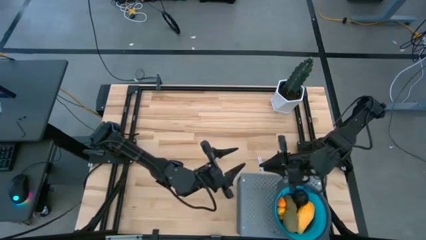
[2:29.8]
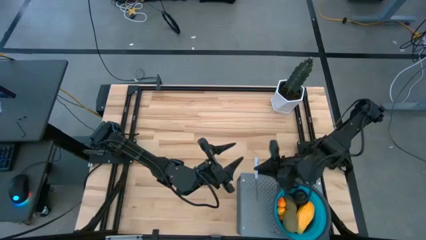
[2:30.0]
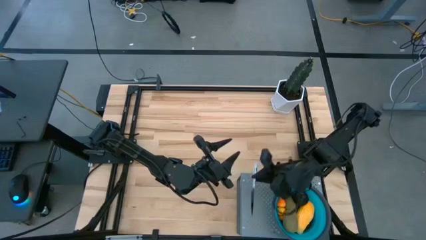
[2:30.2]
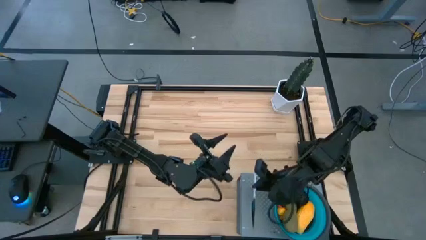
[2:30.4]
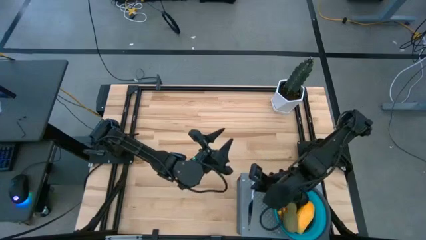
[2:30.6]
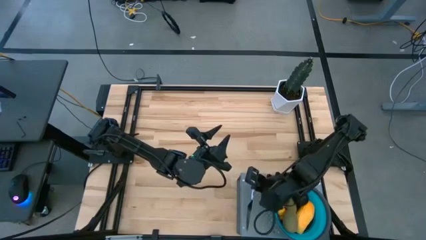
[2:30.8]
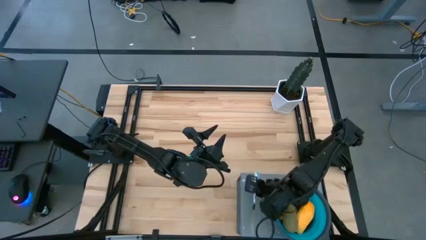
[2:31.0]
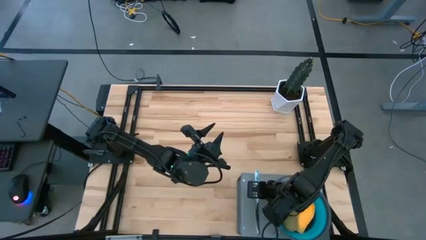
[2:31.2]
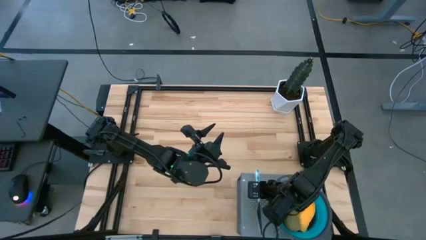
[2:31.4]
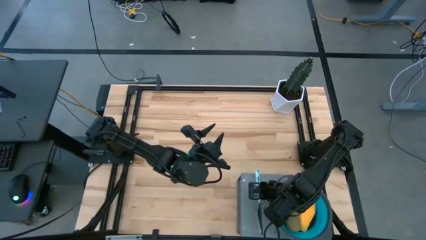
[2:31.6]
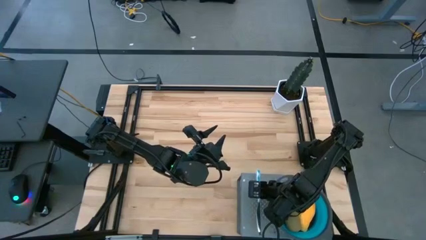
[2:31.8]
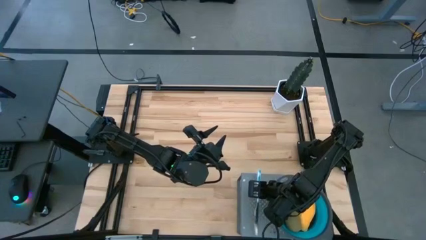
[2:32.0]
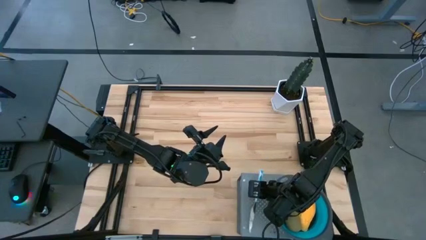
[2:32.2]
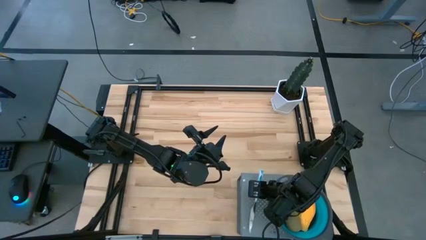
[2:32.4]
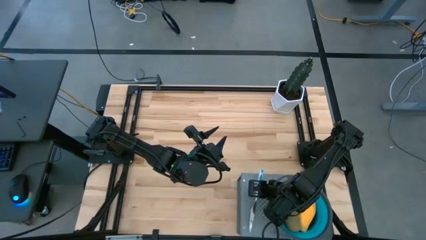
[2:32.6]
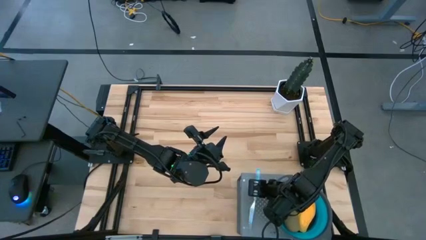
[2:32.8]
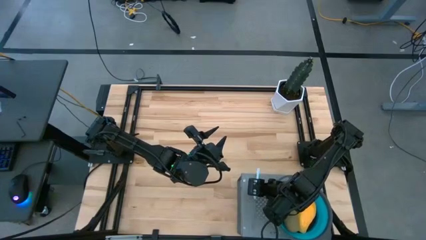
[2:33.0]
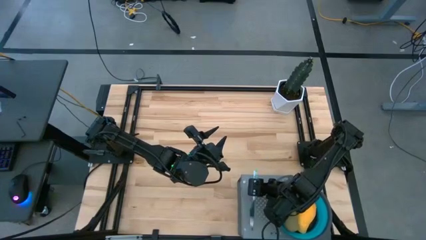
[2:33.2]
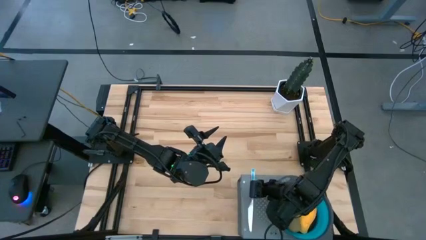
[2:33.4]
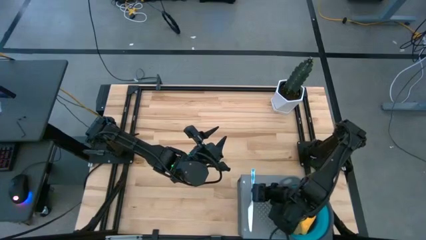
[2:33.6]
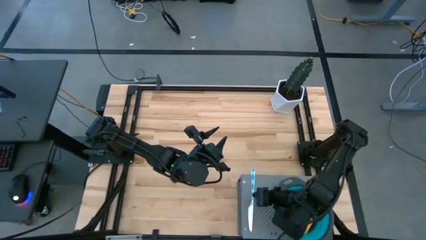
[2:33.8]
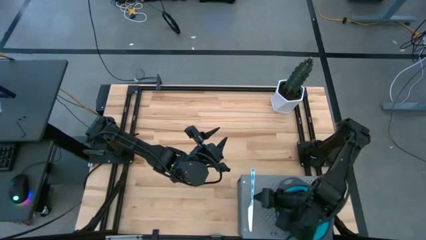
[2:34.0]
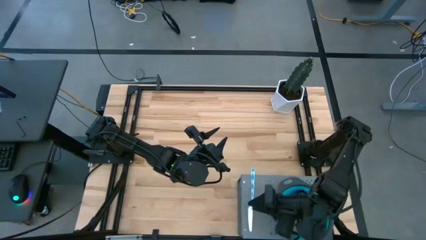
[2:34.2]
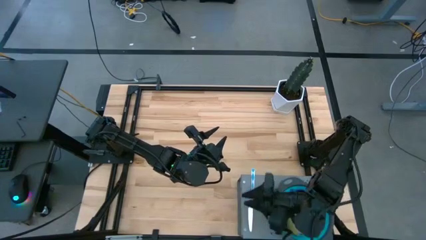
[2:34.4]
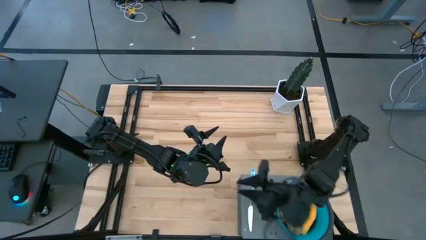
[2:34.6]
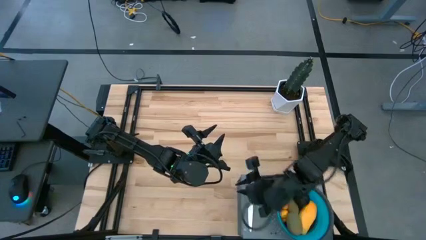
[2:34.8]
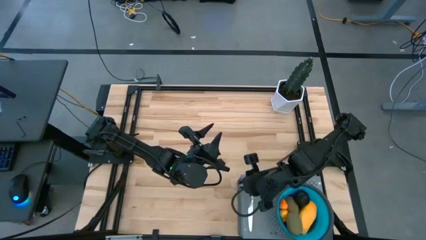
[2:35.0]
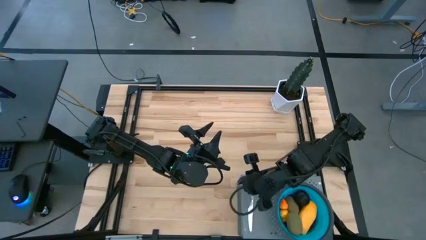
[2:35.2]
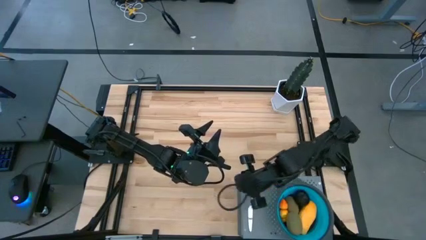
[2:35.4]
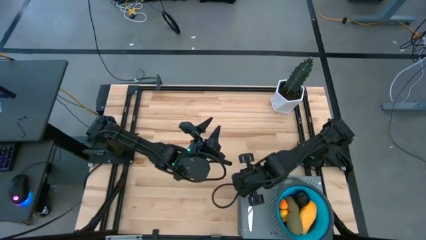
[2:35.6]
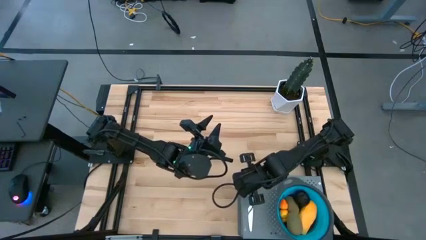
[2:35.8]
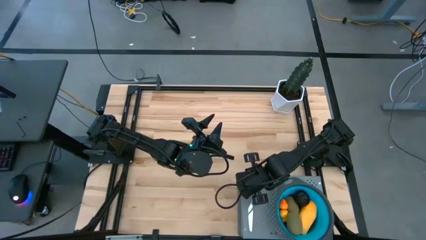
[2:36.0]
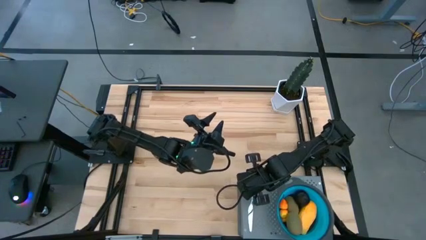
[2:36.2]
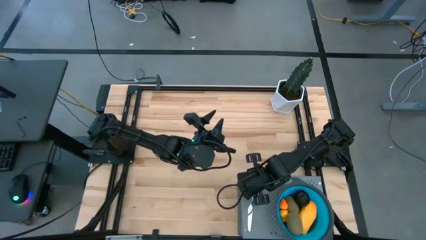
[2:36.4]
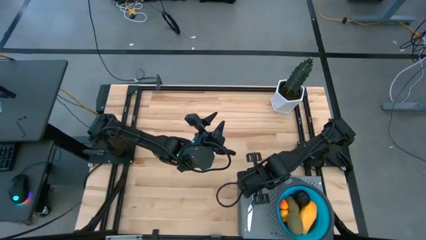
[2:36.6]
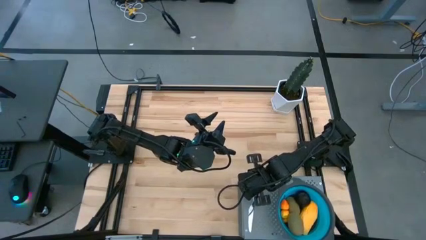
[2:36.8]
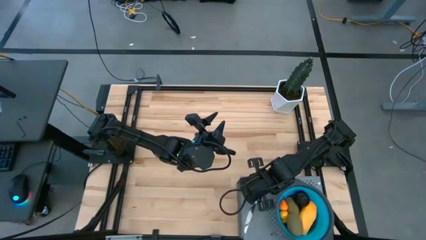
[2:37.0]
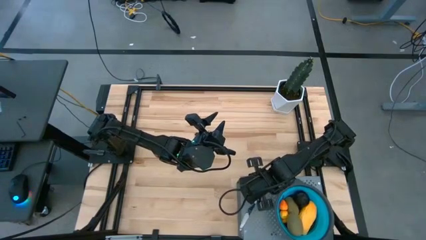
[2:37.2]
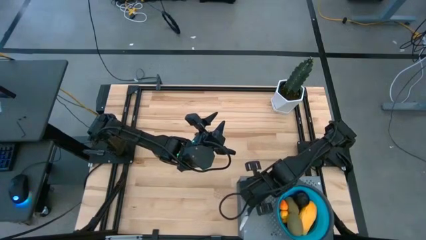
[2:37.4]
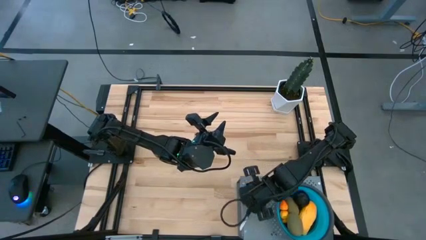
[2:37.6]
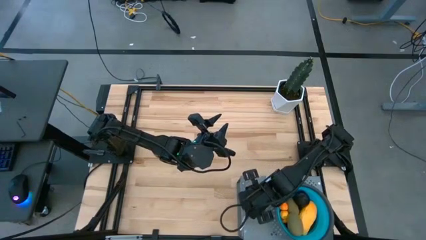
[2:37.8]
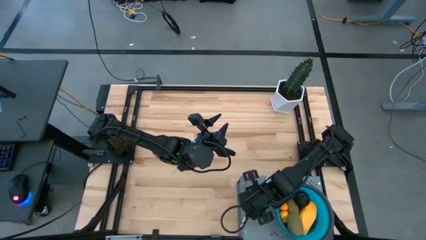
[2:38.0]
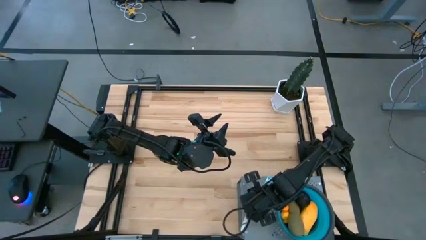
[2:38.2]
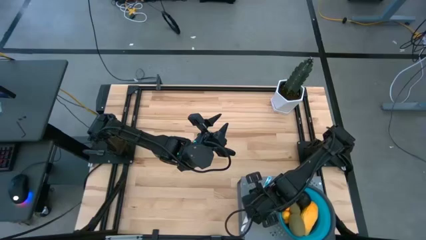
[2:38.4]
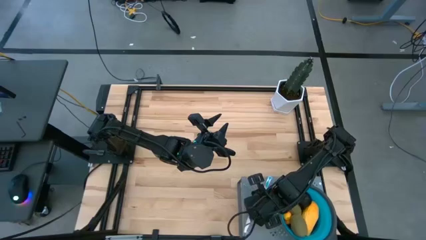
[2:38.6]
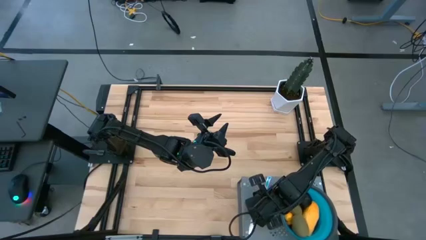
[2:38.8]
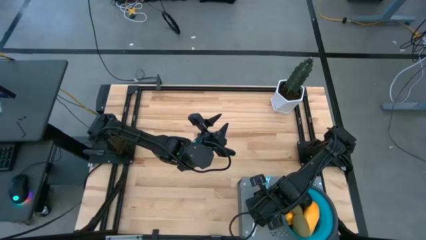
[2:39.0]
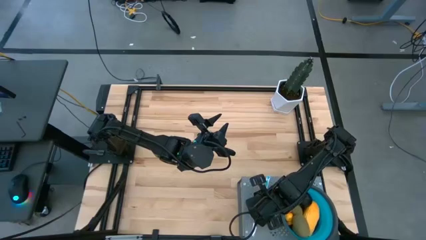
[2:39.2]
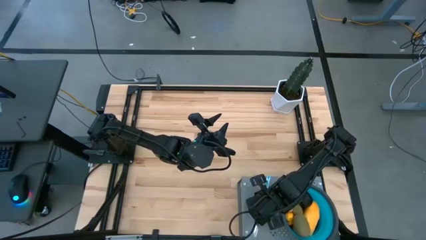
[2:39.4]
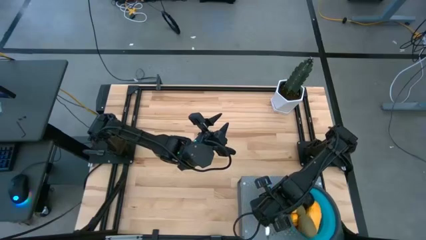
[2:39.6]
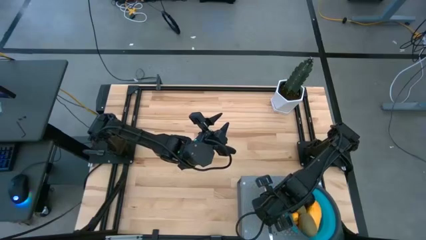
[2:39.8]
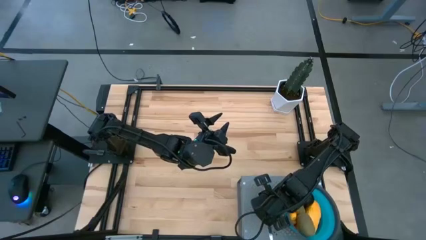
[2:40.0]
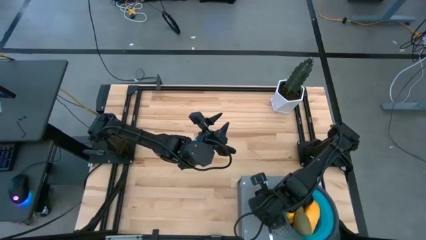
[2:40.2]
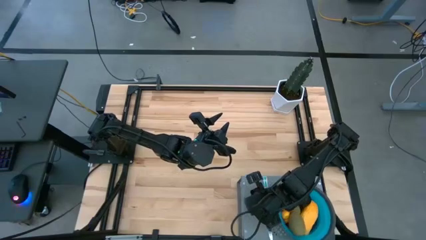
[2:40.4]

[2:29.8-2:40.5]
Task: Pick & Place Fruit
Put the white patterned table knife on the shelf

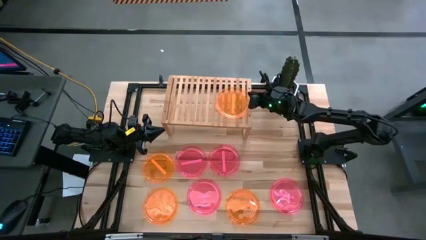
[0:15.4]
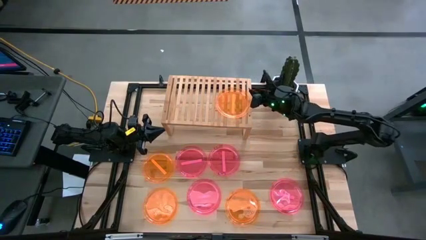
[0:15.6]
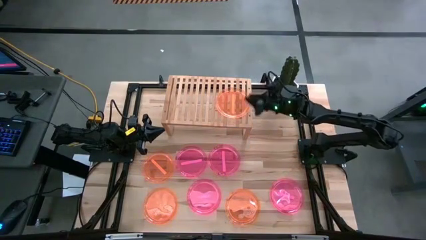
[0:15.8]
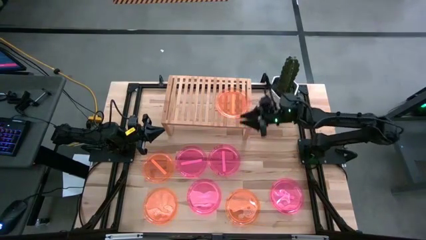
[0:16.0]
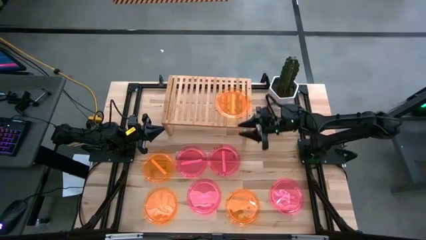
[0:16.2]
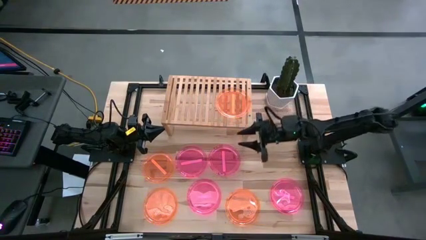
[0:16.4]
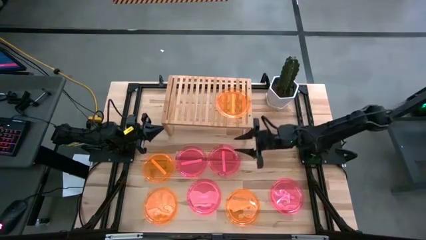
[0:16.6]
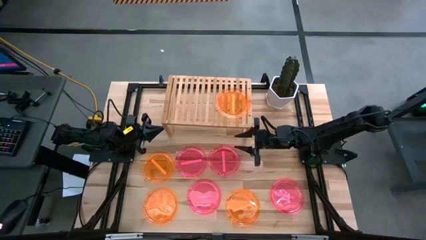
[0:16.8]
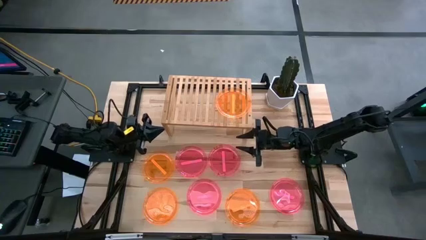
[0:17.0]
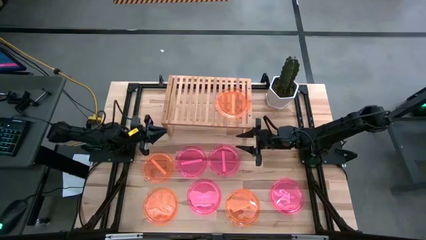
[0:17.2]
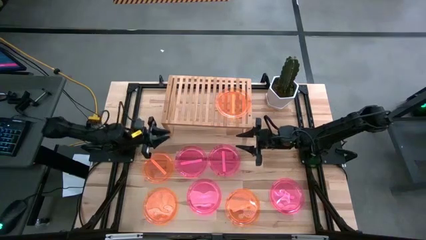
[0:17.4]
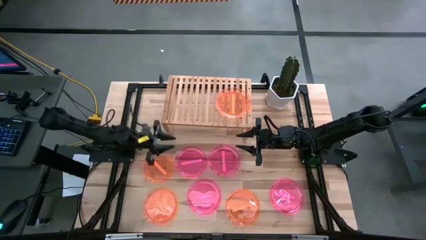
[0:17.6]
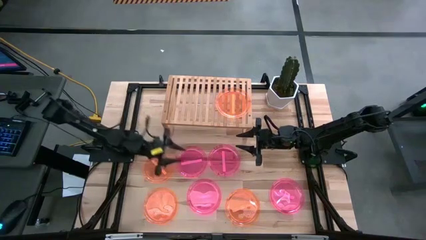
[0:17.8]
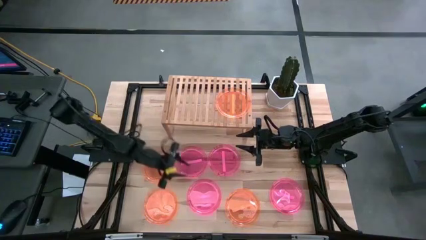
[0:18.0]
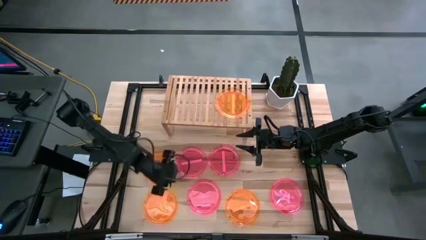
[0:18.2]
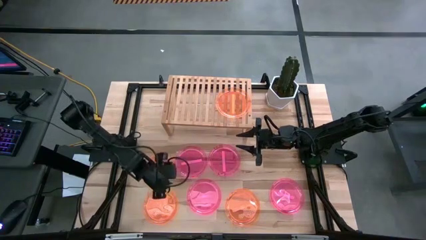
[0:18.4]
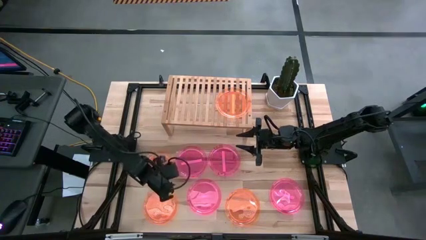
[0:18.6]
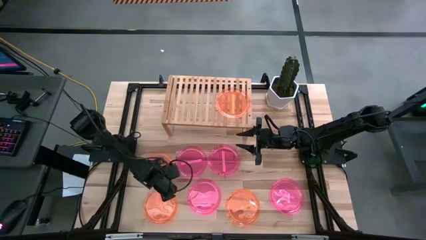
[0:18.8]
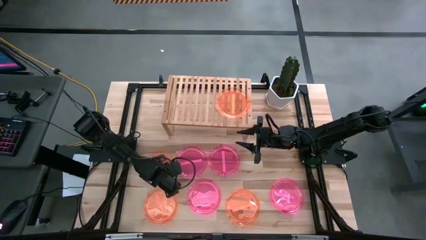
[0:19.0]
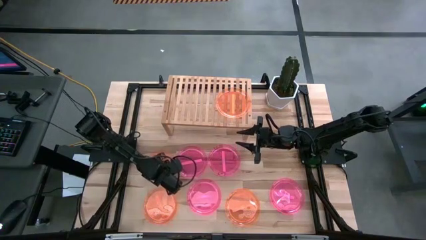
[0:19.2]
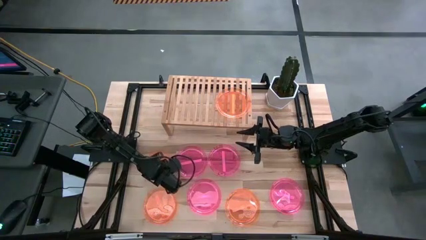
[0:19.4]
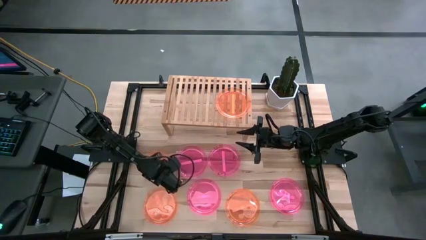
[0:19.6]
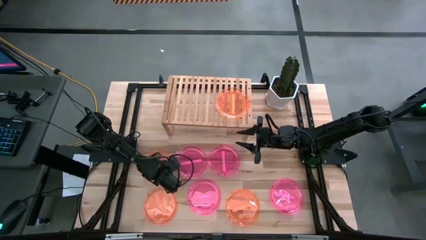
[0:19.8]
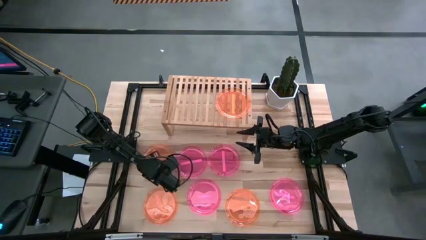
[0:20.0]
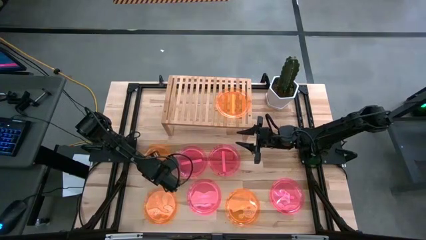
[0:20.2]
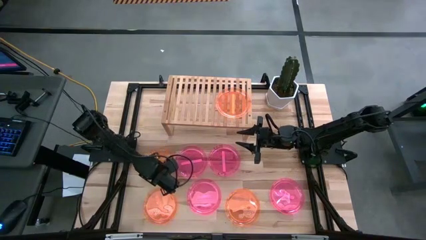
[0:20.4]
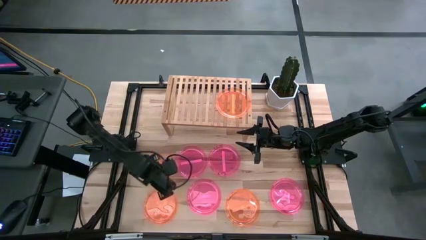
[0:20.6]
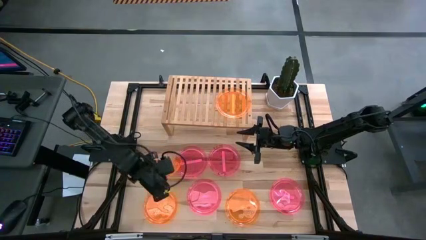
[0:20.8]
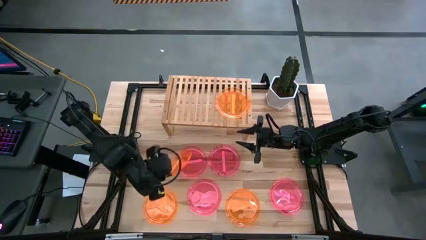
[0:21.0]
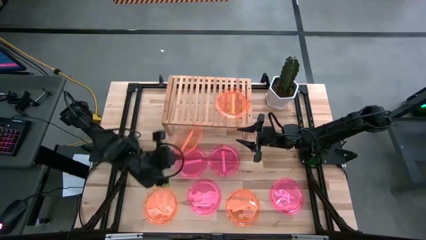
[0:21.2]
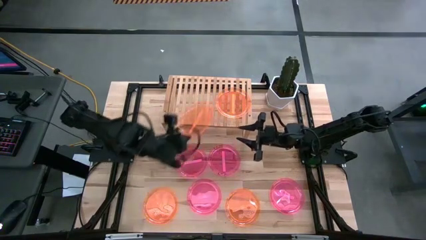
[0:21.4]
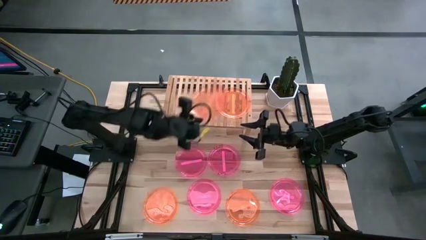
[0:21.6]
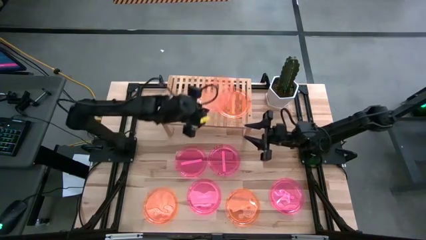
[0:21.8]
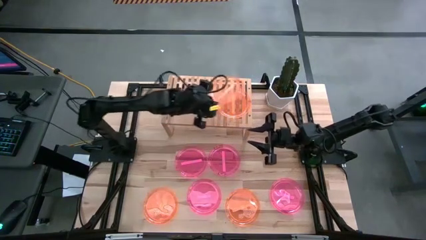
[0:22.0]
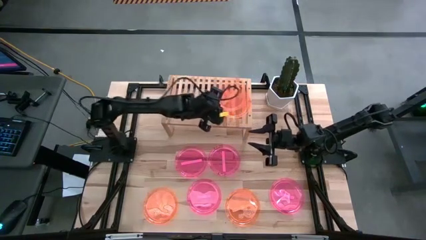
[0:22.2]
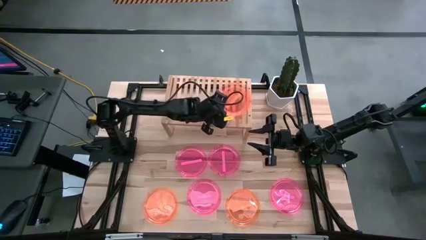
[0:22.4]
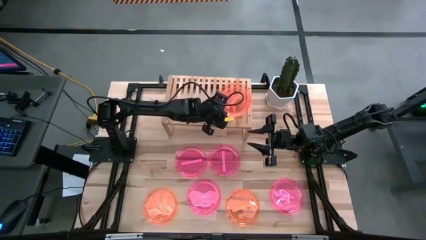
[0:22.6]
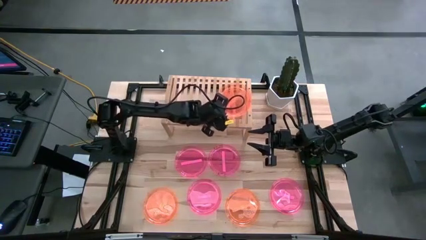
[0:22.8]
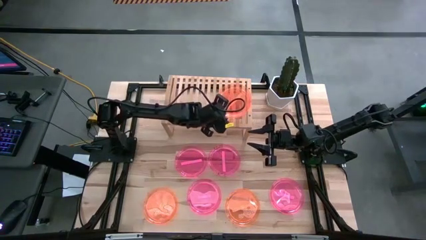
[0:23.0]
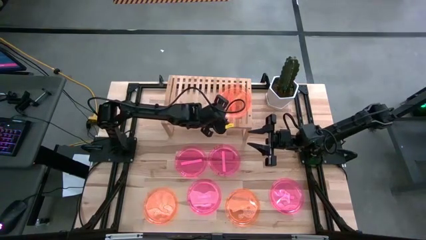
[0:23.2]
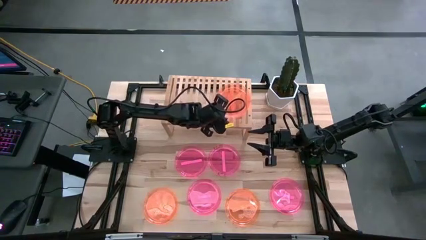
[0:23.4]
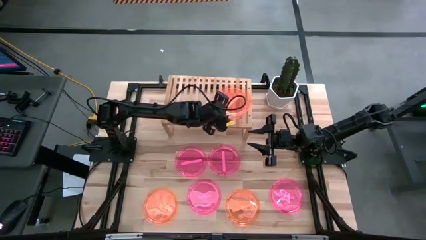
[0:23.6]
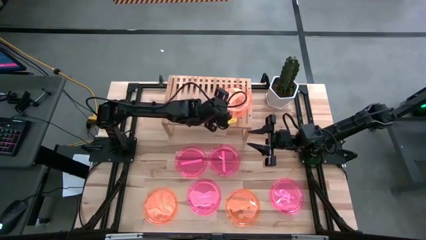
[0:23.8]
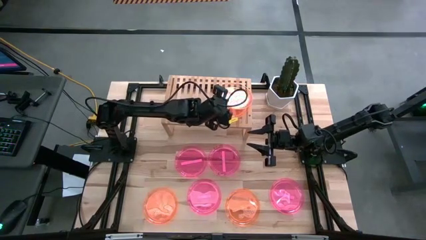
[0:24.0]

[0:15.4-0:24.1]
Task: Place and stack plates onto a shelf
Stack the orange plate on top of the other orange plate on the shelf
